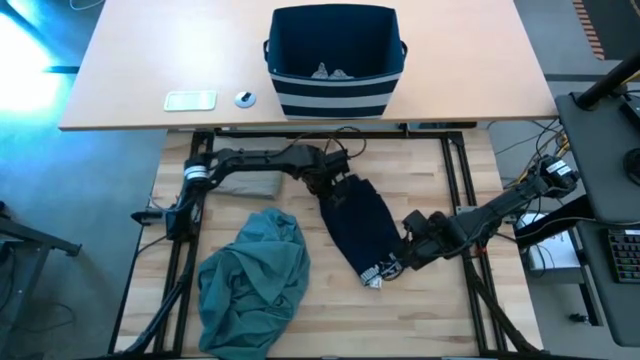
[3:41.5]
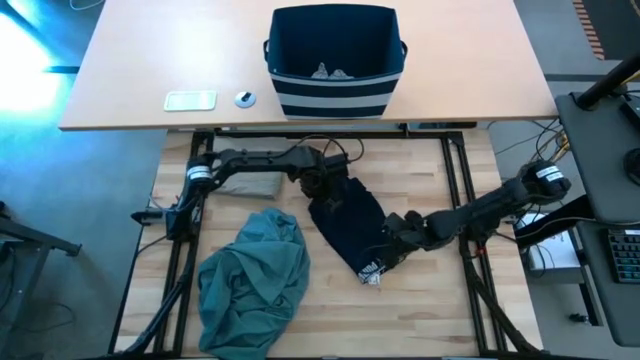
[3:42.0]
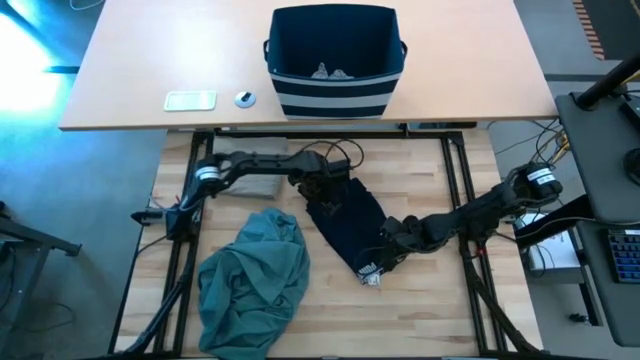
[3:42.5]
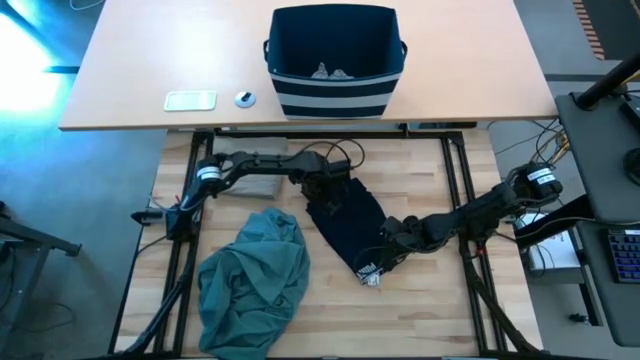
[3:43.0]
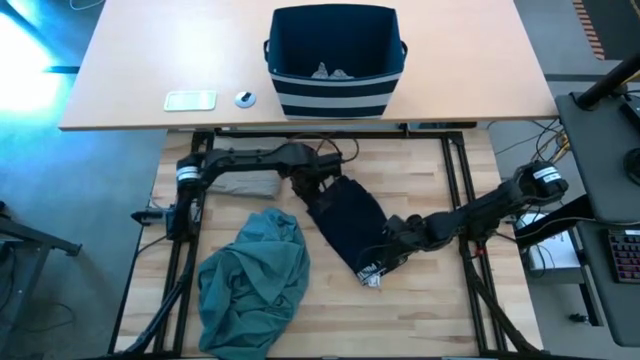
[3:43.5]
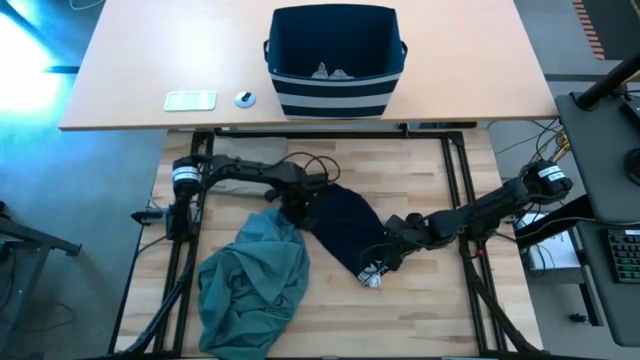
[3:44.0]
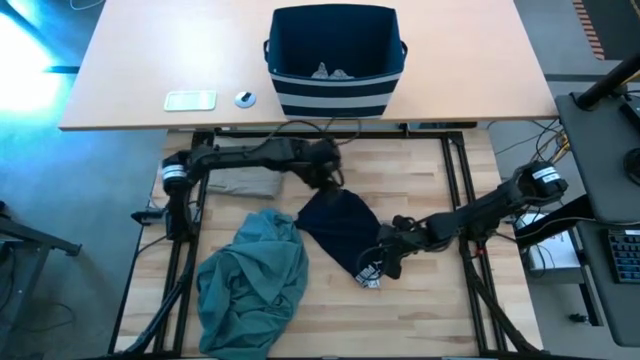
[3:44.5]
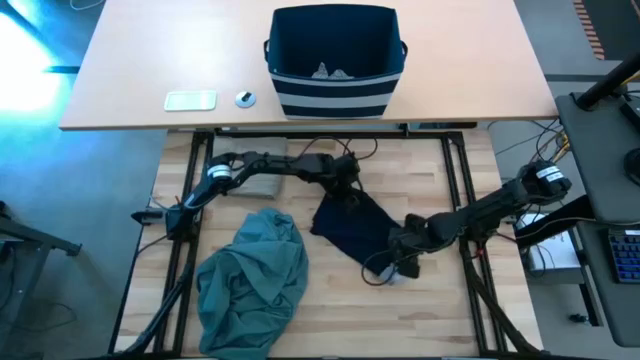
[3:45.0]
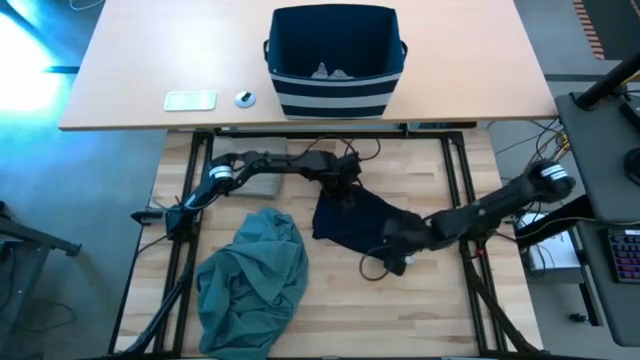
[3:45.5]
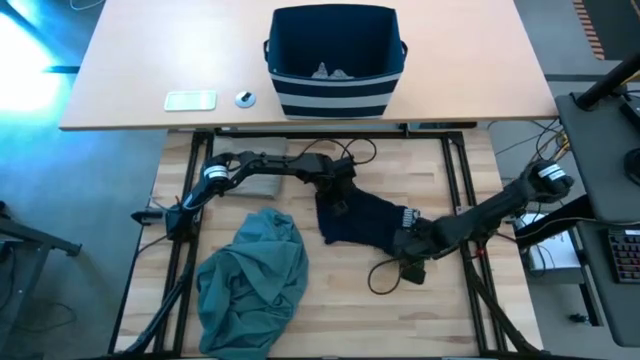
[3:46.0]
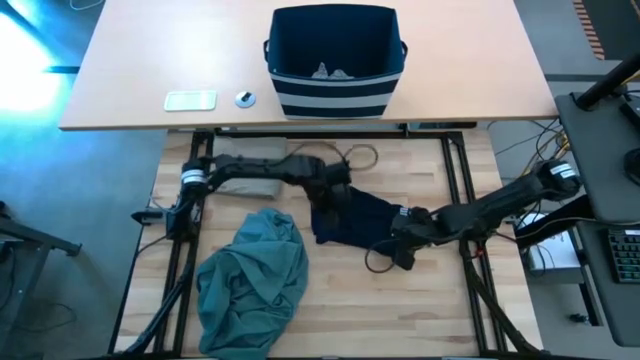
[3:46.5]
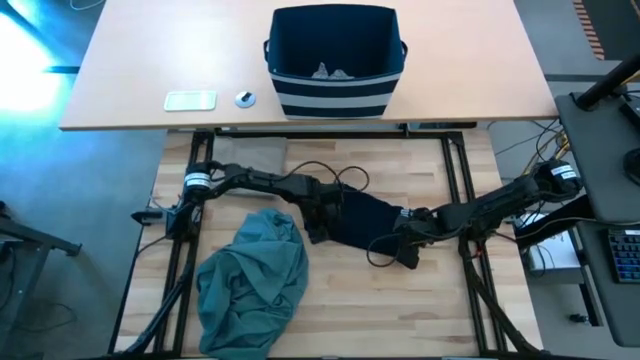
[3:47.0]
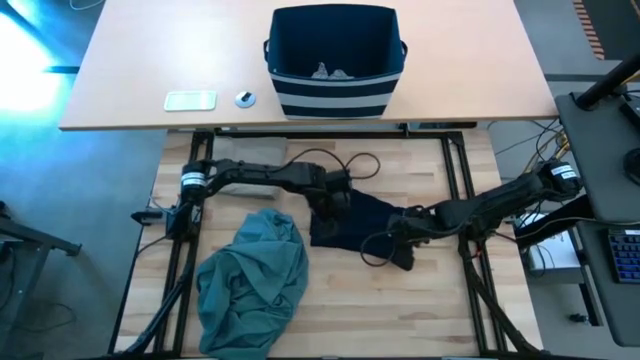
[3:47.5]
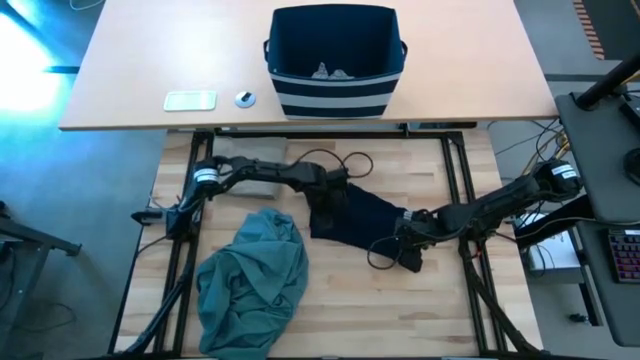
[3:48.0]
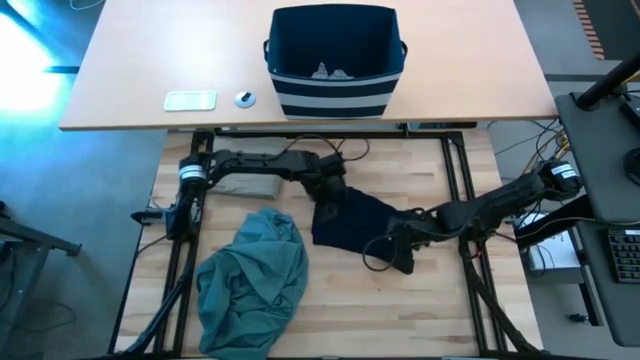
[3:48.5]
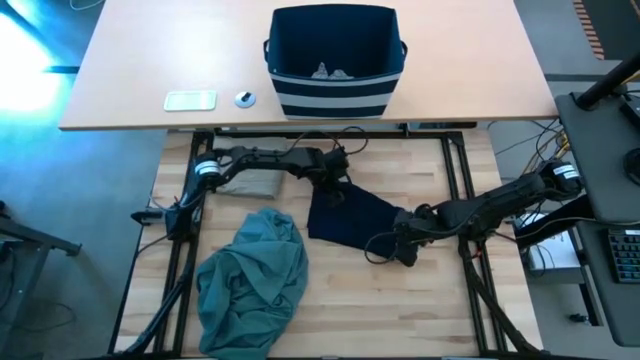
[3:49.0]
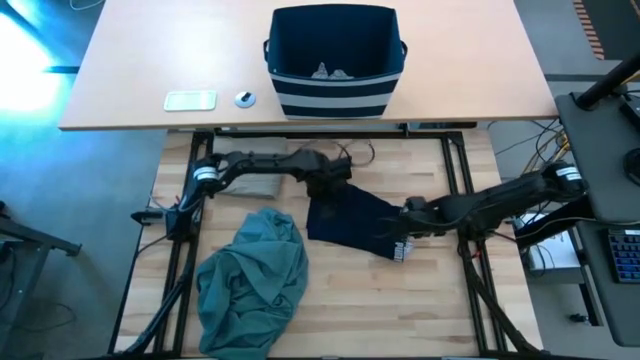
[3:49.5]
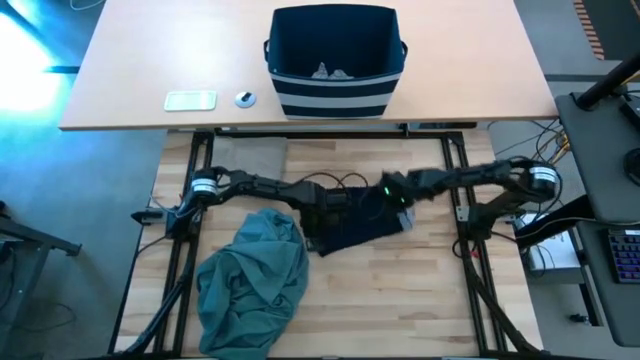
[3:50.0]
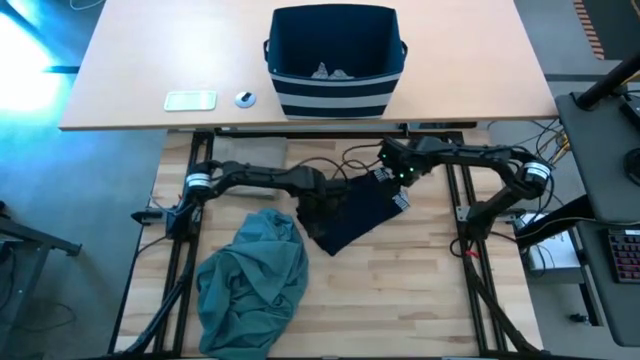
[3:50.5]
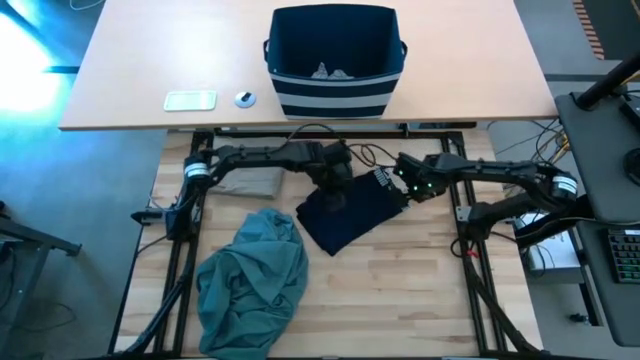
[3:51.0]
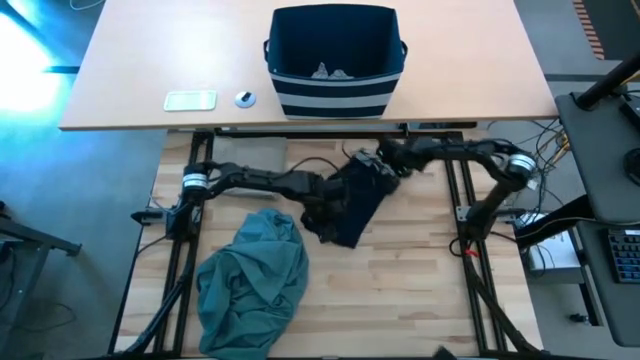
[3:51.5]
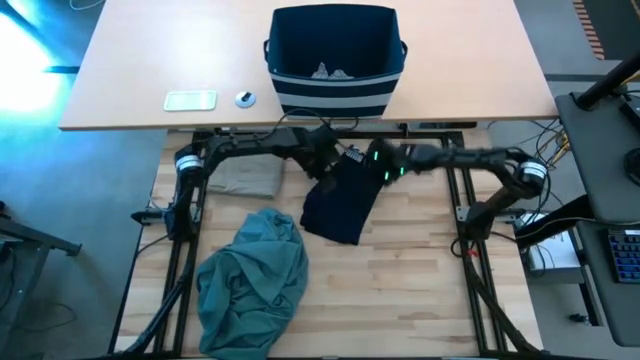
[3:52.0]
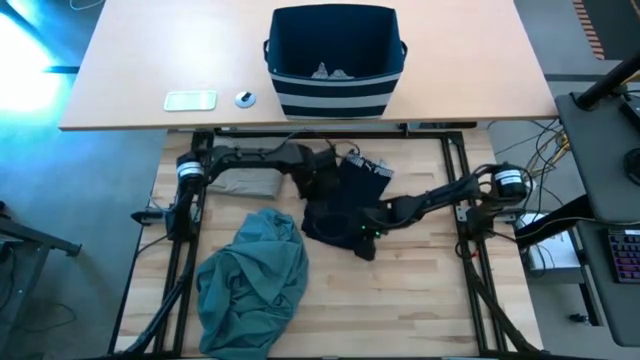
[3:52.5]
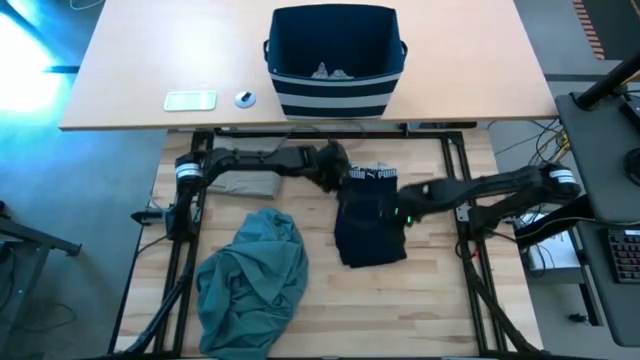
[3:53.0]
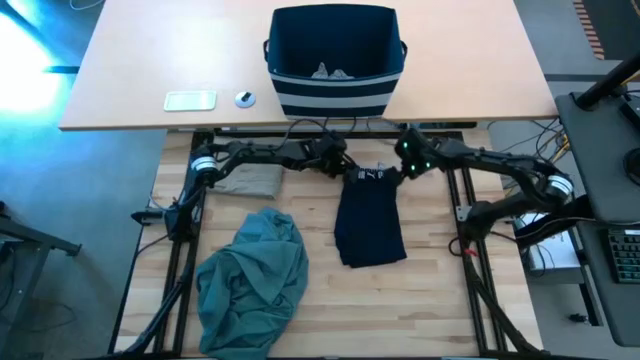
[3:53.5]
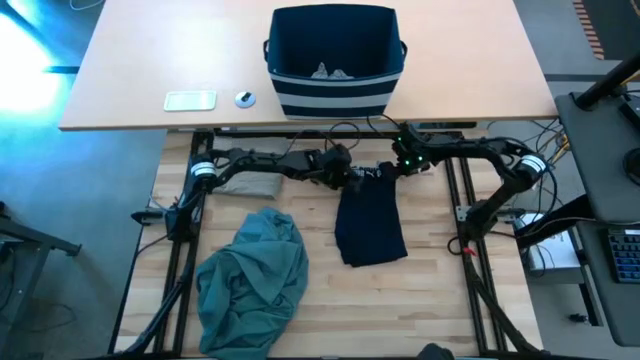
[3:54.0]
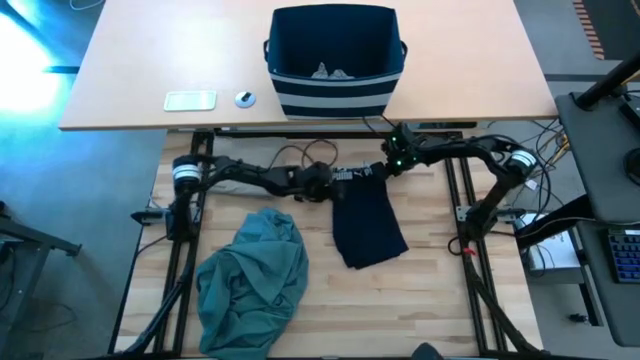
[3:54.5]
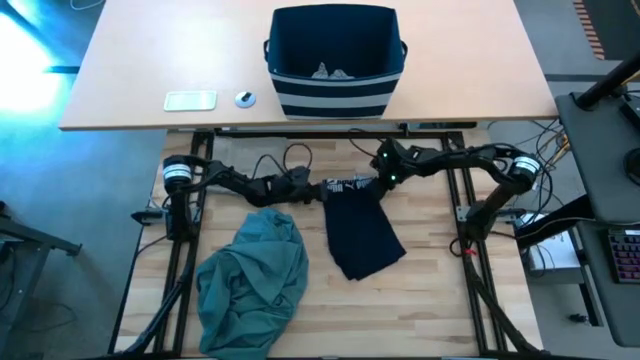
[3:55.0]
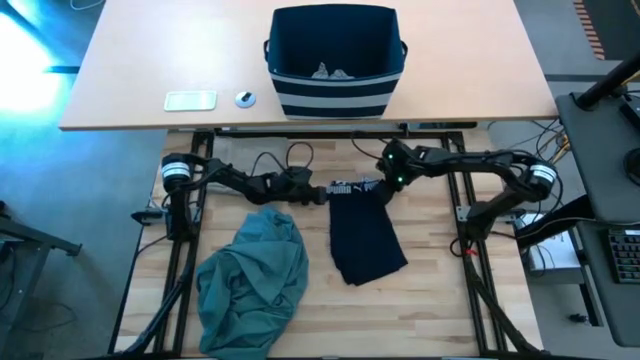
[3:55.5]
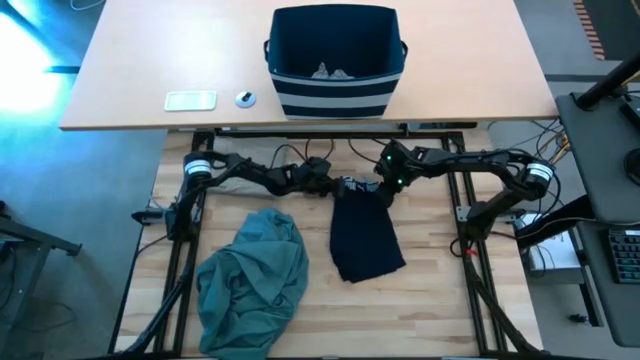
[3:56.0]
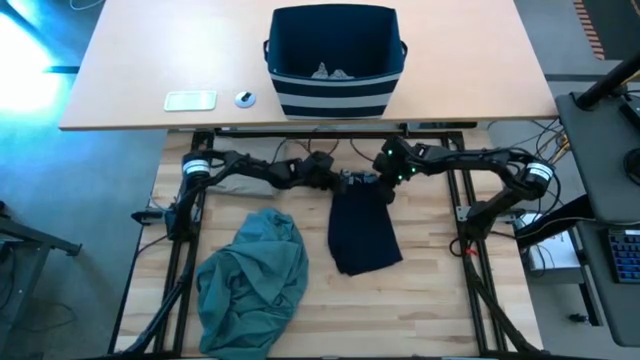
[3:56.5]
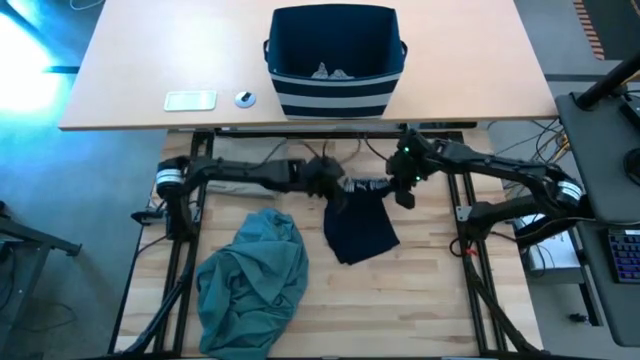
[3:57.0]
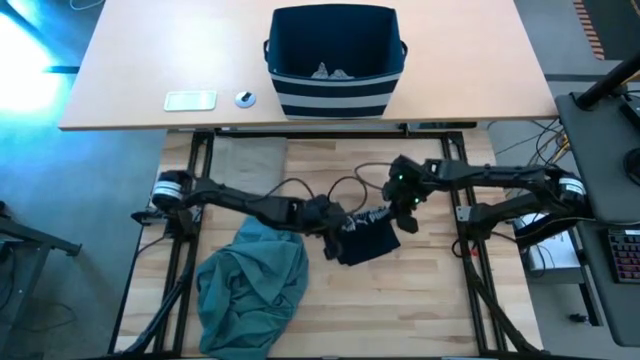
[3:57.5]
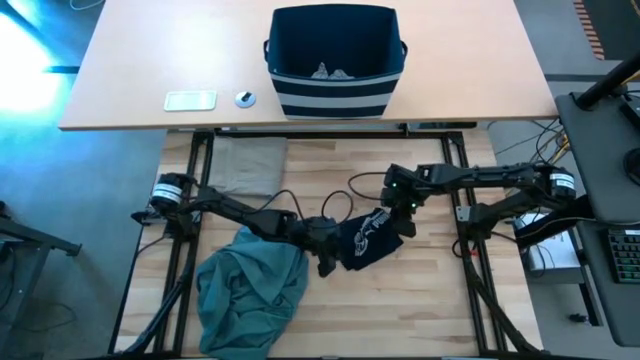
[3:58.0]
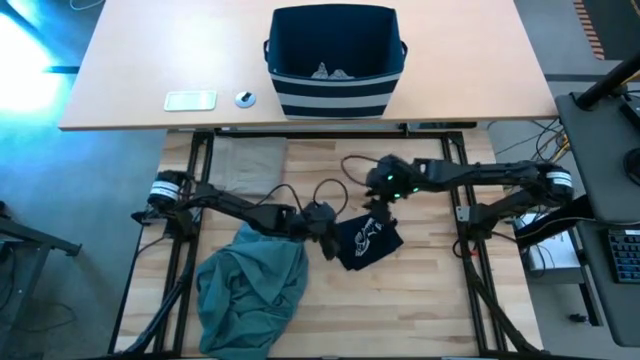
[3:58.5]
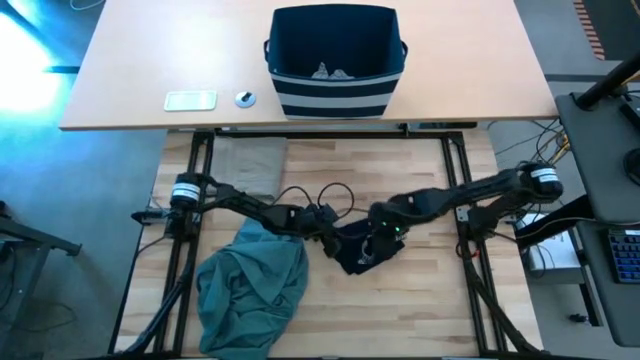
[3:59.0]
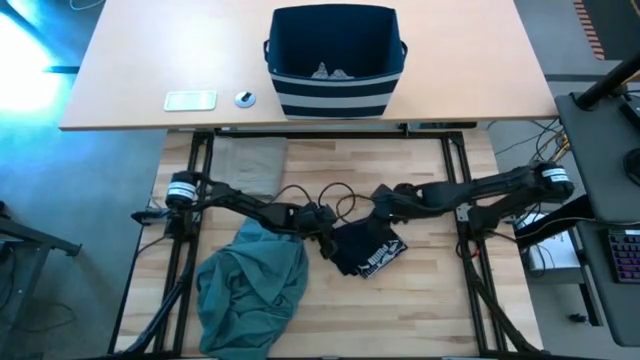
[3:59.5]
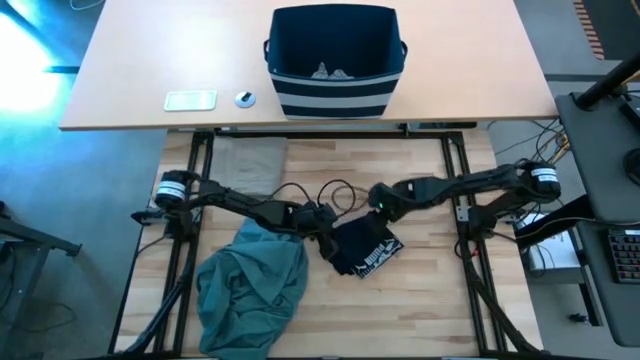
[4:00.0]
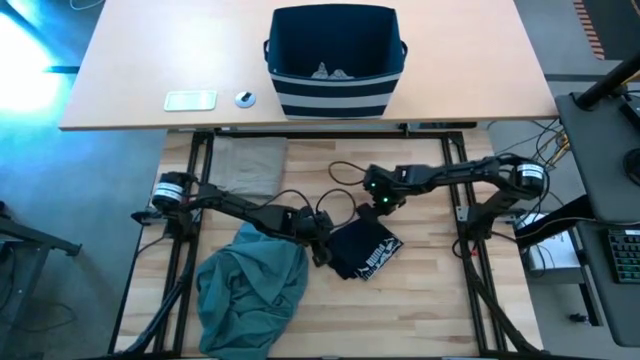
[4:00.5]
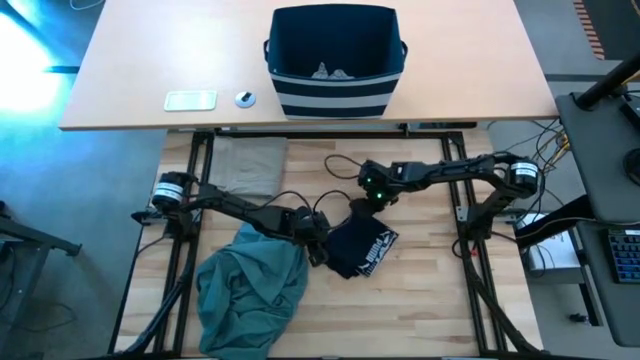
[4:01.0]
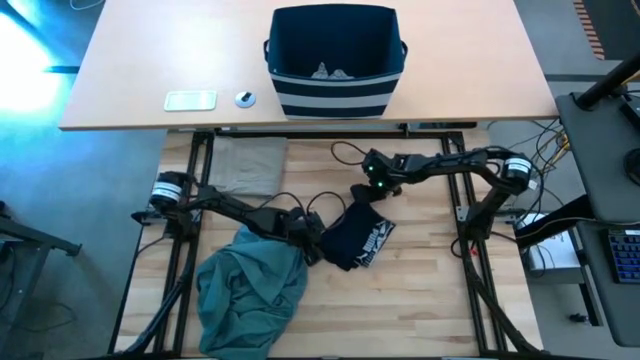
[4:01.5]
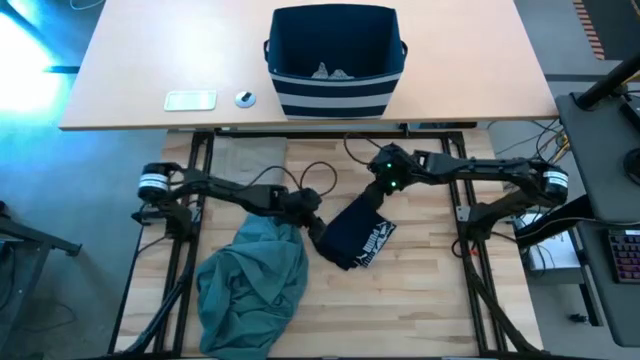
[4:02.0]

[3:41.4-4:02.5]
Task: Fold Laundry from Bin
Fold the black underwear
